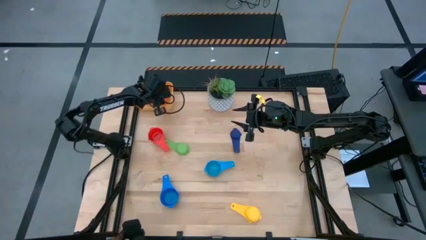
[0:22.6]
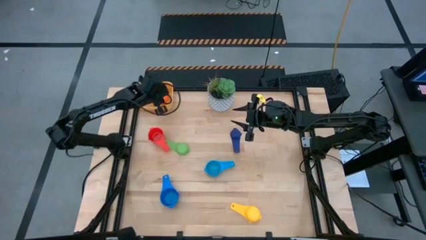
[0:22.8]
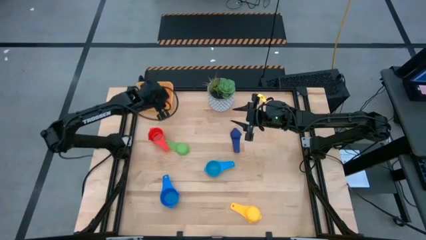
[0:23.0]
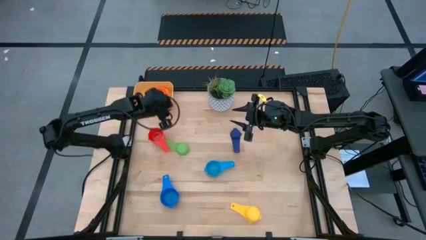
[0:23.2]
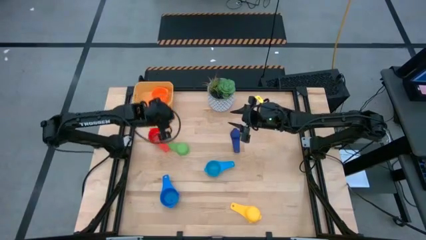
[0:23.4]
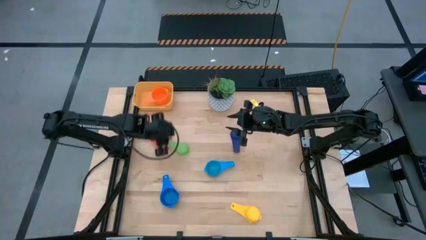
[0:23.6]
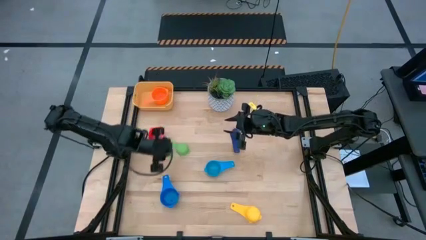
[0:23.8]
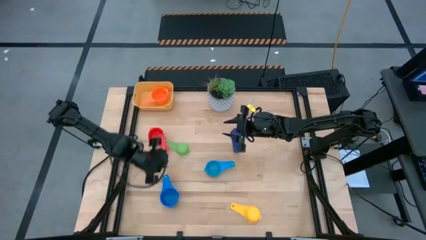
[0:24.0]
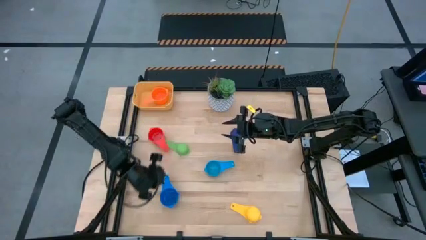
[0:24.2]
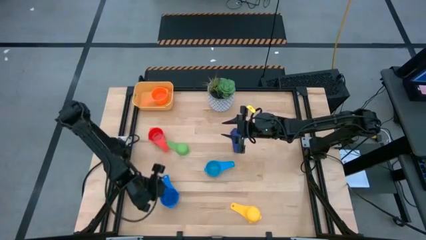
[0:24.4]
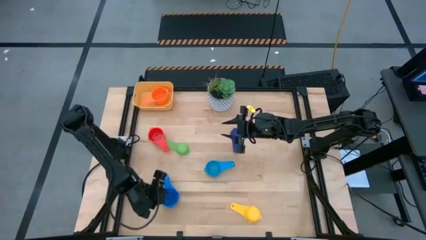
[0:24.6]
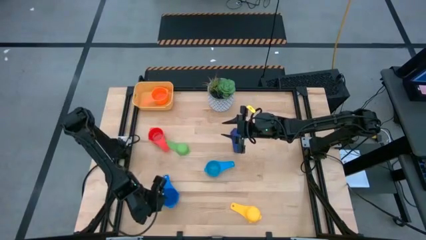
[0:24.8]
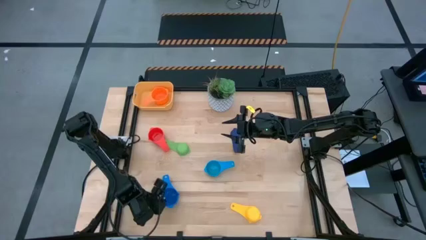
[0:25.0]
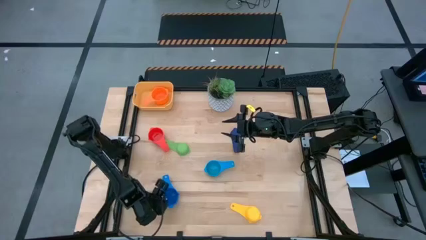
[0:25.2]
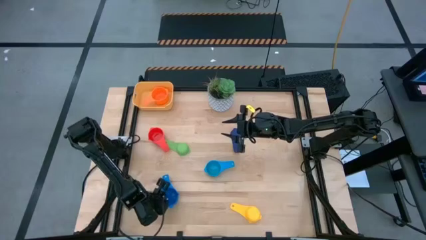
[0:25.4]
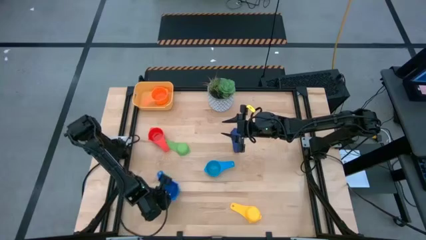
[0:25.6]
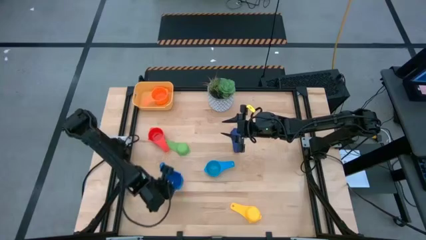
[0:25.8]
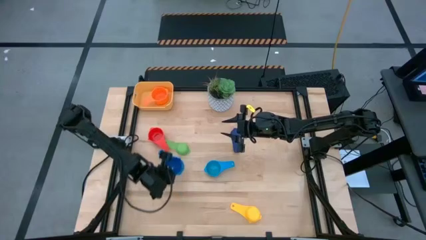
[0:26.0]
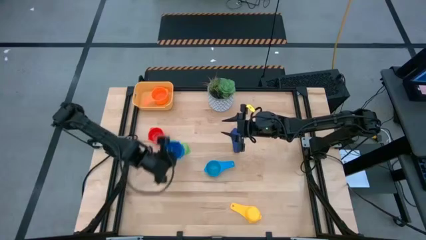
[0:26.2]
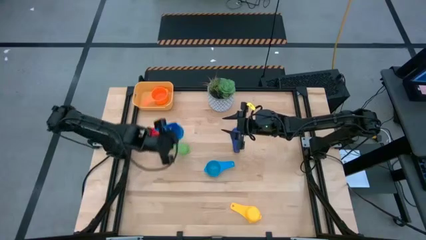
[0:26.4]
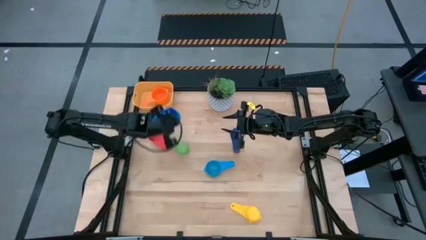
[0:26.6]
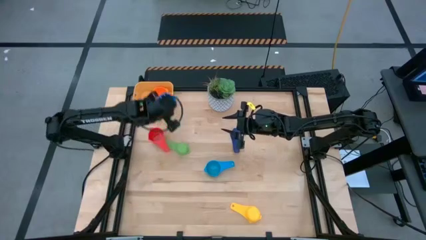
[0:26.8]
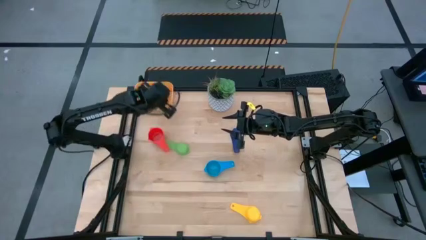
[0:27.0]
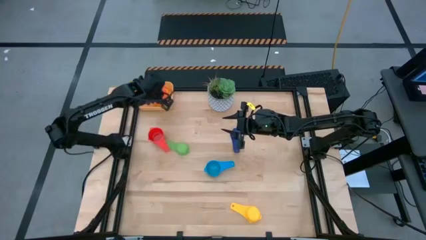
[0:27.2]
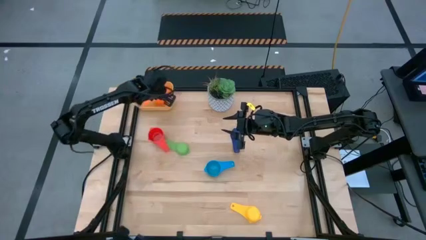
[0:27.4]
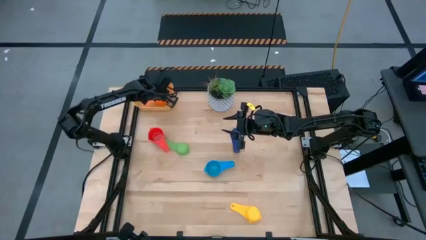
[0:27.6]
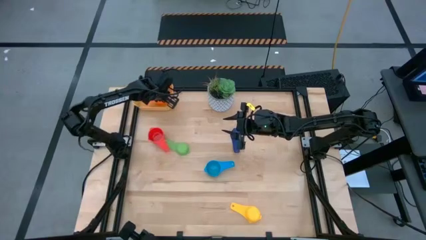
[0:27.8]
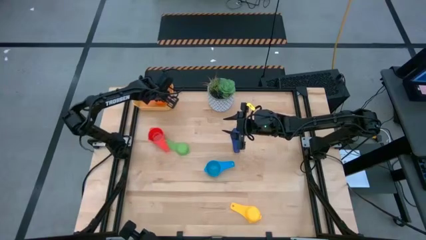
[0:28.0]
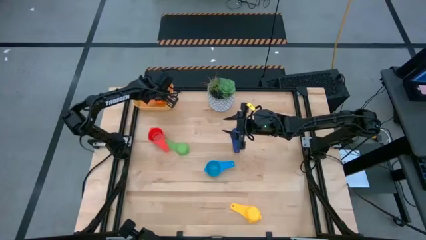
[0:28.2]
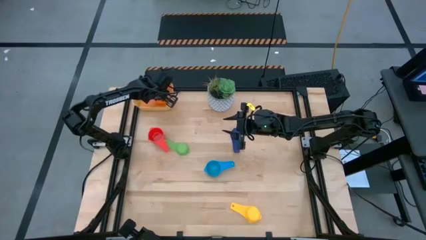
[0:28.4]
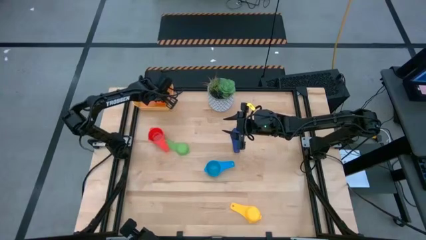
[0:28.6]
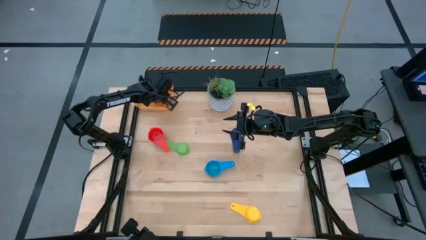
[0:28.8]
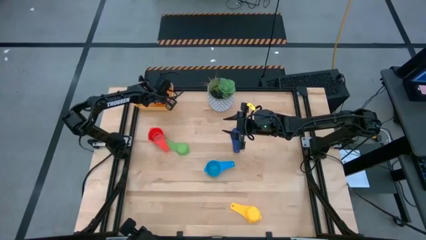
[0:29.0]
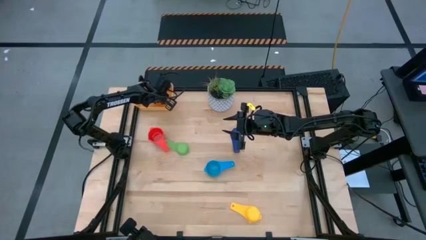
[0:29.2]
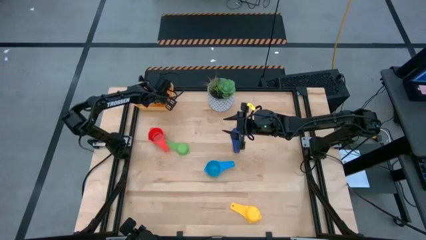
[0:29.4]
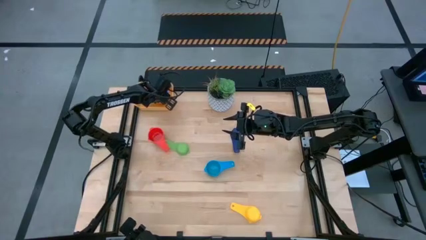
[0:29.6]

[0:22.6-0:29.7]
Task: Nest measuring cups in basket
Stack the dark blue measuring cup on top of the light orange measuring cup in the yellow bin

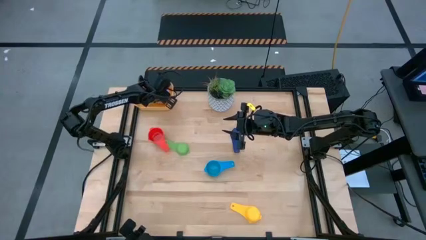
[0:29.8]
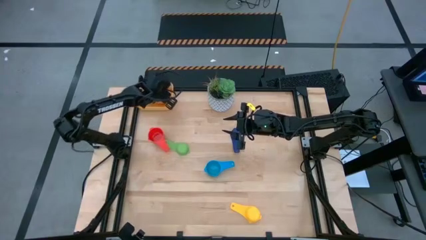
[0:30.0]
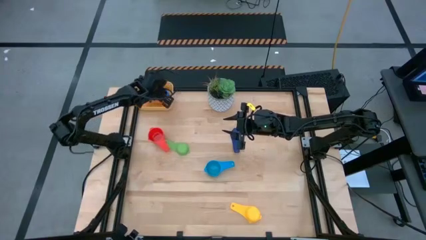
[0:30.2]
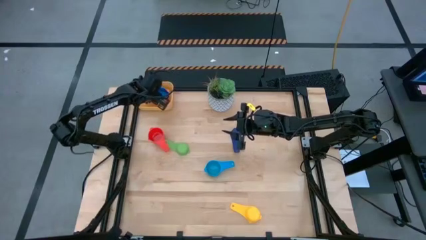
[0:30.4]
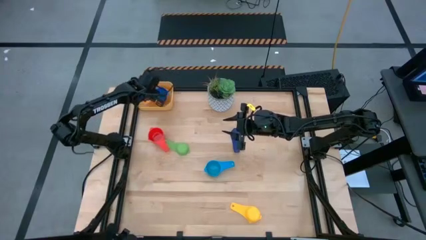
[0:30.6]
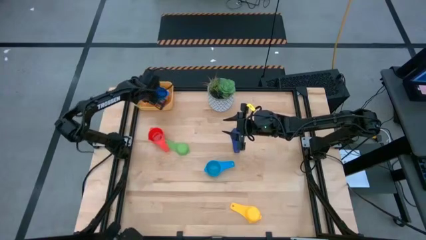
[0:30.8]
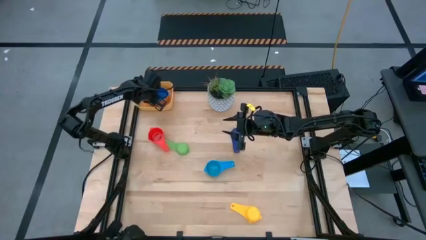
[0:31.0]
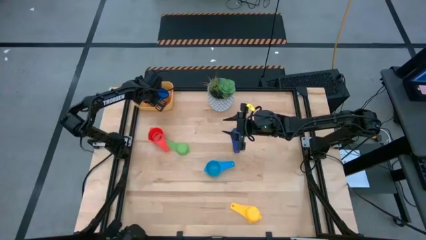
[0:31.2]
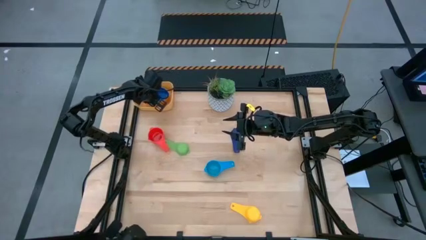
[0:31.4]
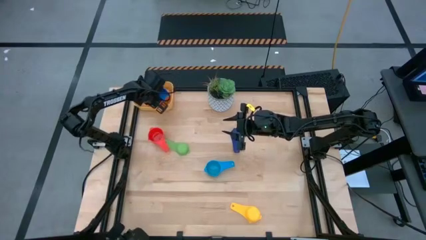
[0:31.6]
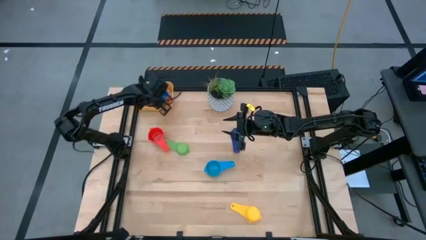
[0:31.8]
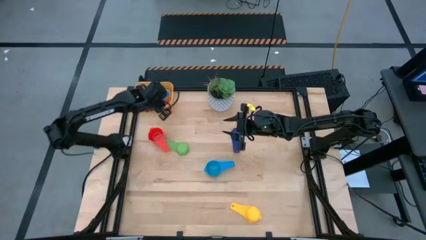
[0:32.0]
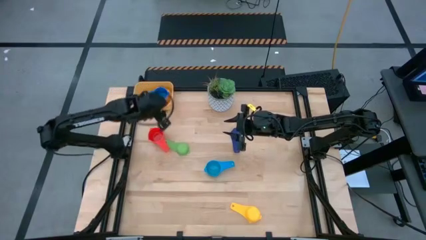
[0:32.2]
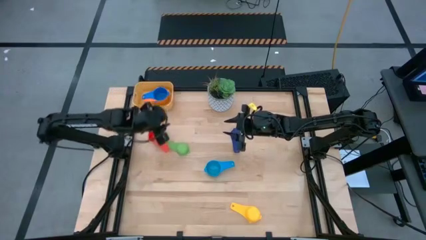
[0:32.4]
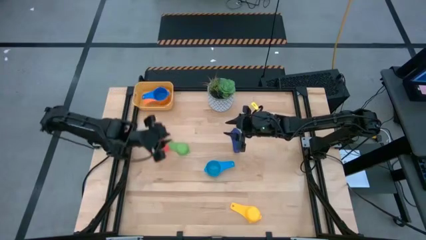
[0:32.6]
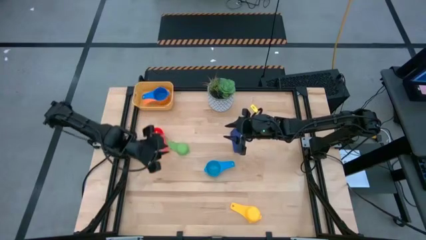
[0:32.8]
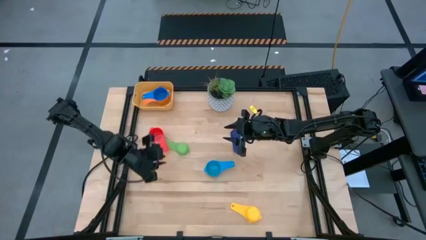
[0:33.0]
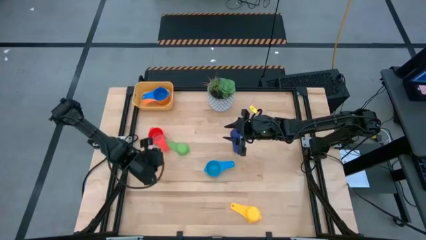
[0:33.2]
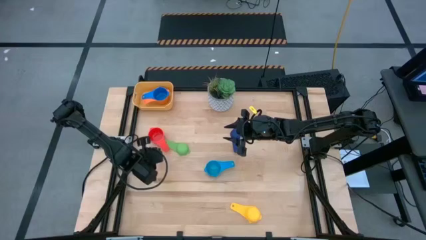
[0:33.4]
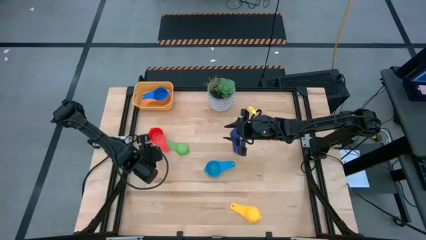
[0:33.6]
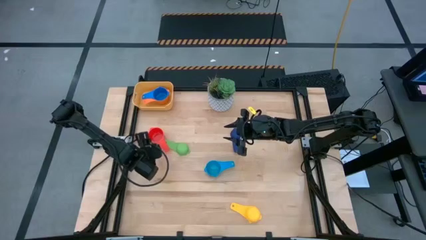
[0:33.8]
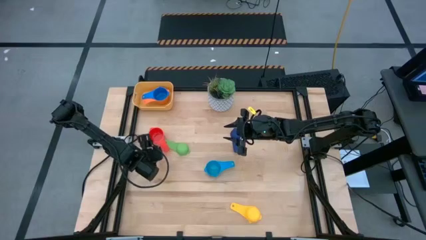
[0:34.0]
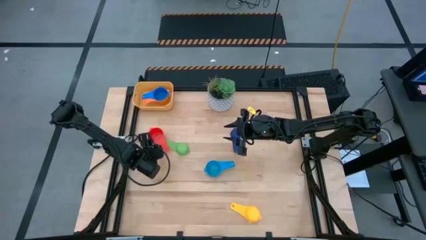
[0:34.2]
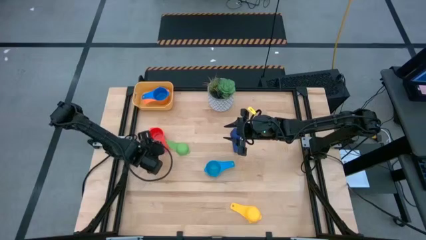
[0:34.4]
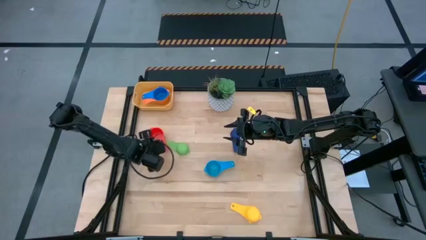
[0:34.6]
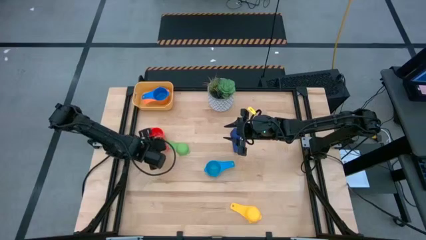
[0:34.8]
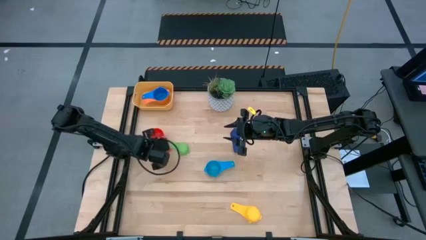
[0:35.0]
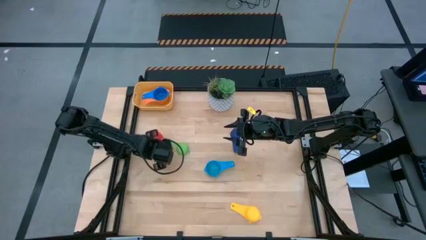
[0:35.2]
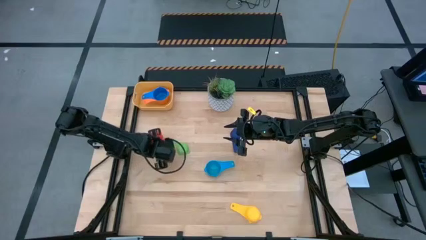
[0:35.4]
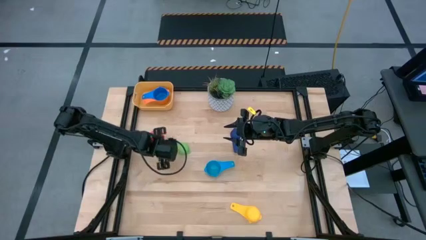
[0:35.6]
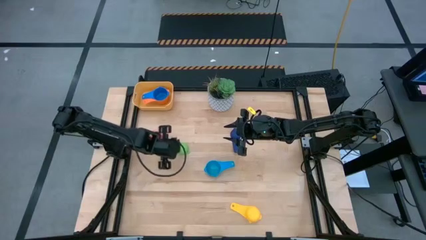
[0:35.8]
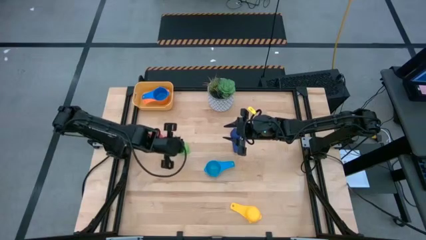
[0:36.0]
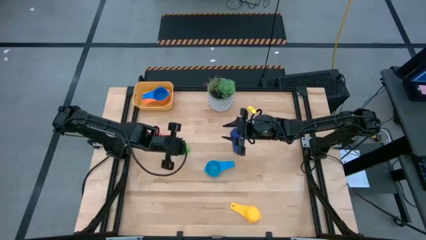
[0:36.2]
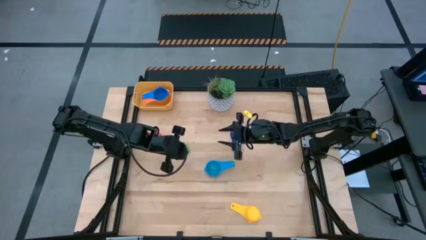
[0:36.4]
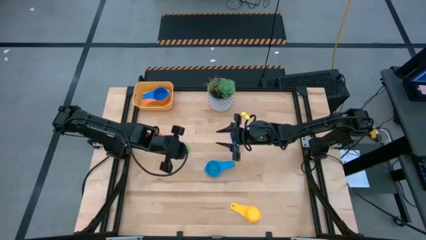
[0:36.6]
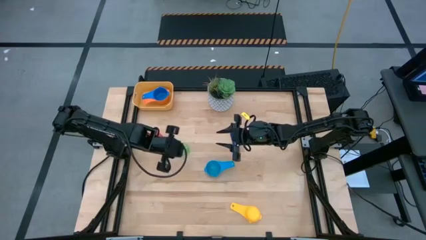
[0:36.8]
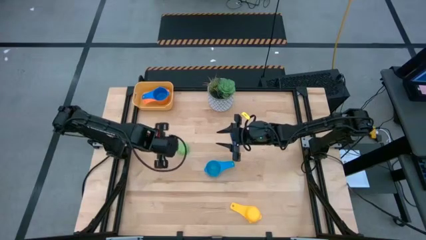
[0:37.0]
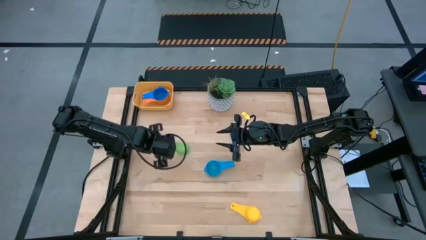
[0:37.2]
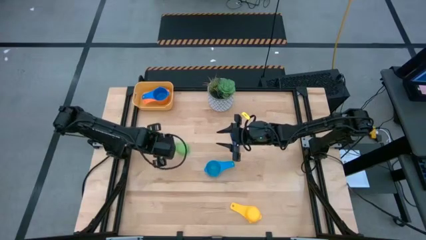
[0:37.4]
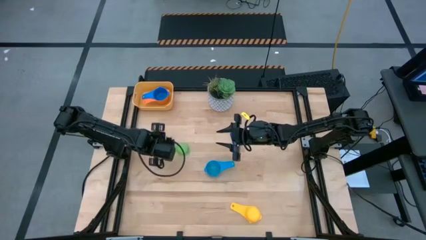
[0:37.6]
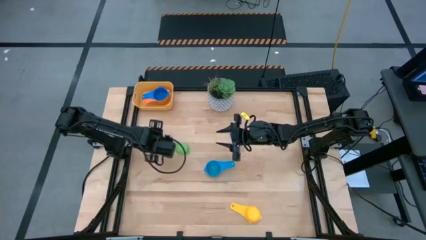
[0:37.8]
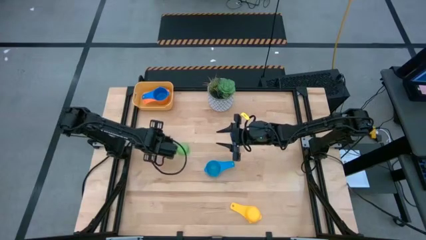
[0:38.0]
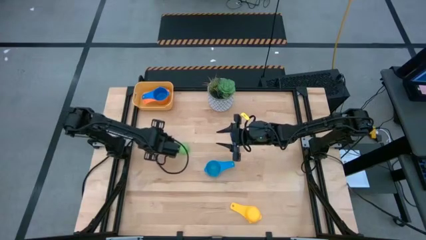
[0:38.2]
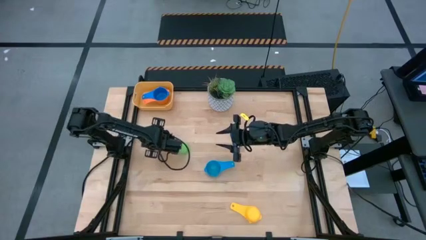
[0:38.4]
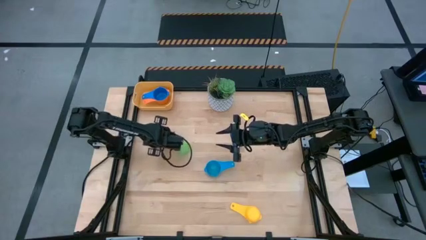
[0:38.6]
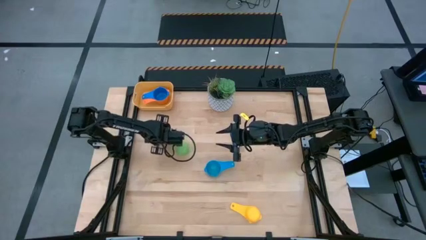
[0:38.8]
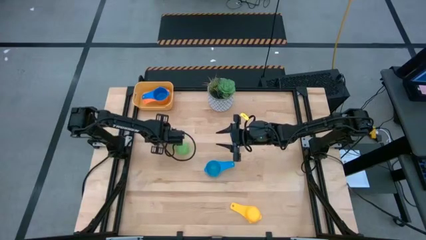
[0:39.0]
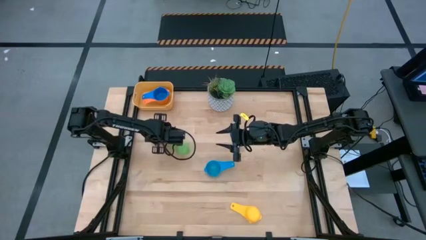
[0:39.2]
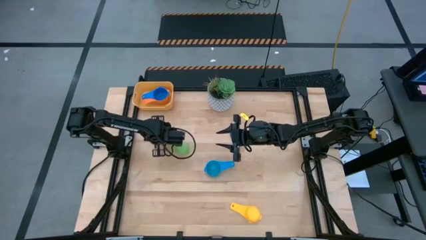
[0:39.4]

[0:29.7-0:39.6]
Stack the dark orange measuring cup on top of the dark blue measuring cup in the yellow bin
